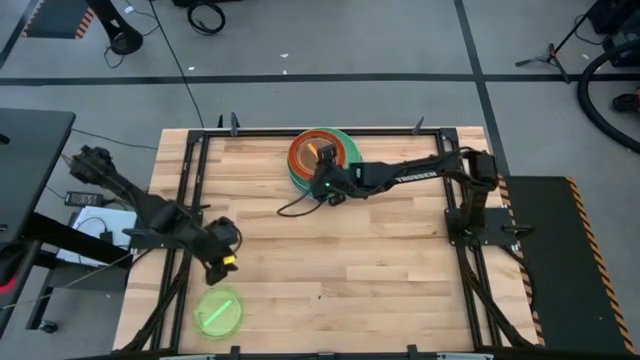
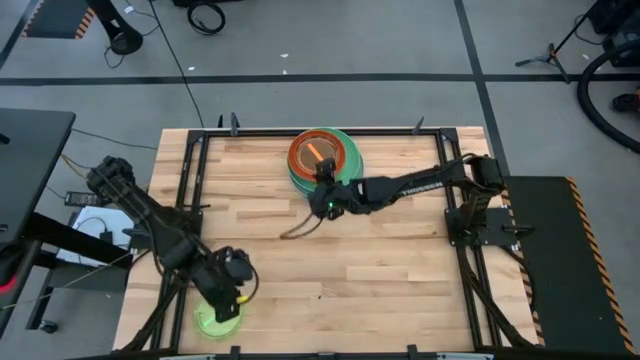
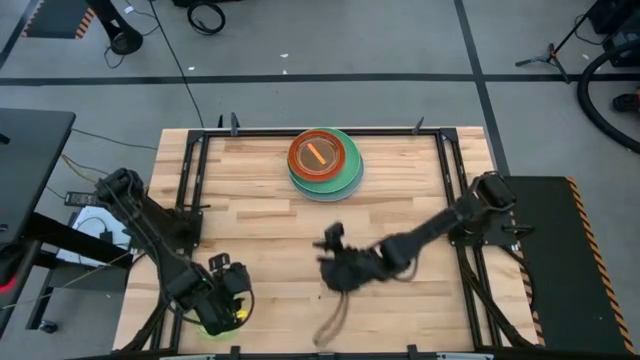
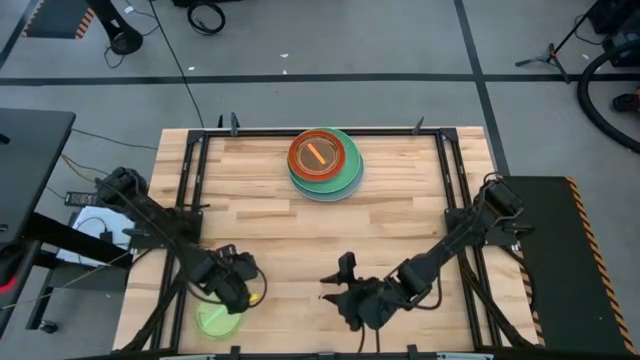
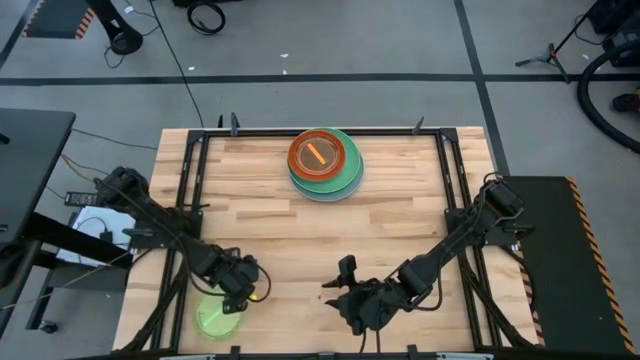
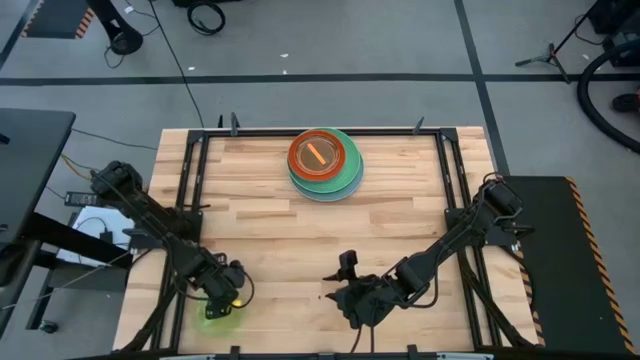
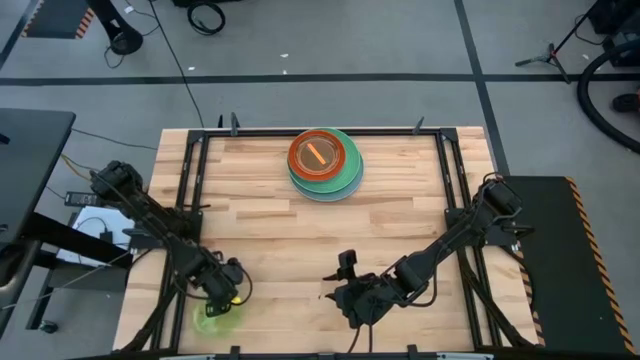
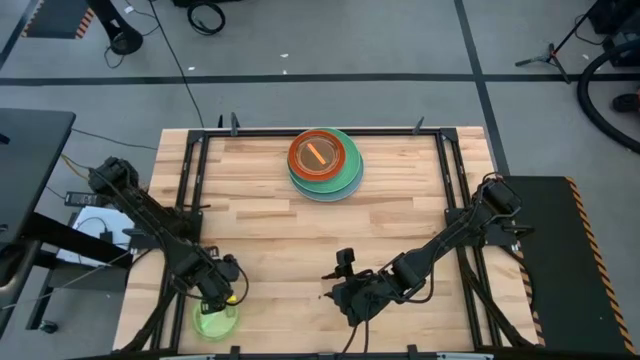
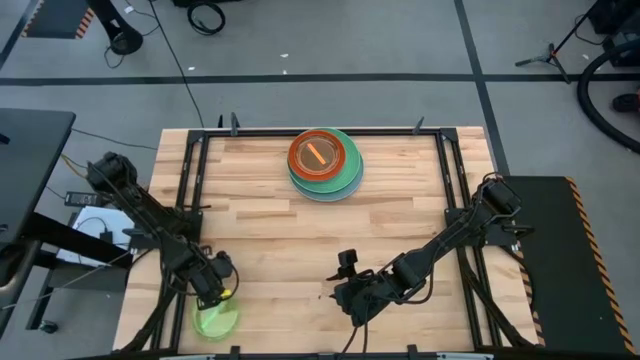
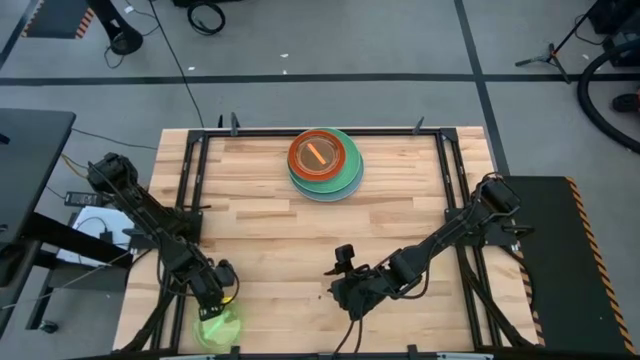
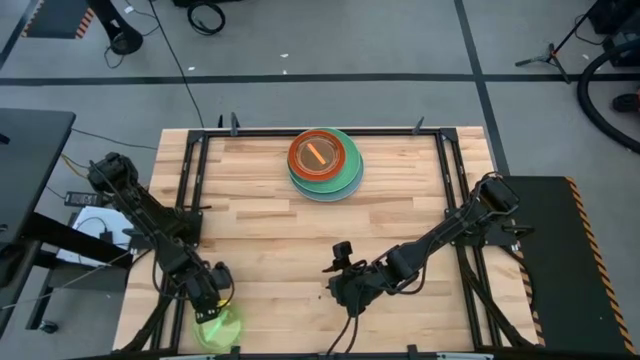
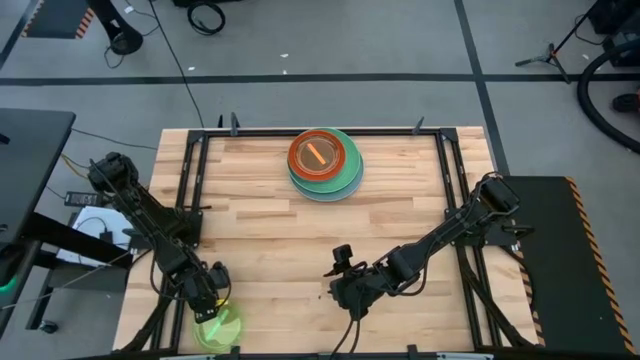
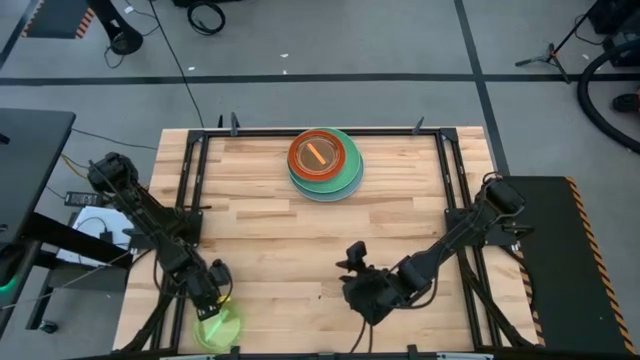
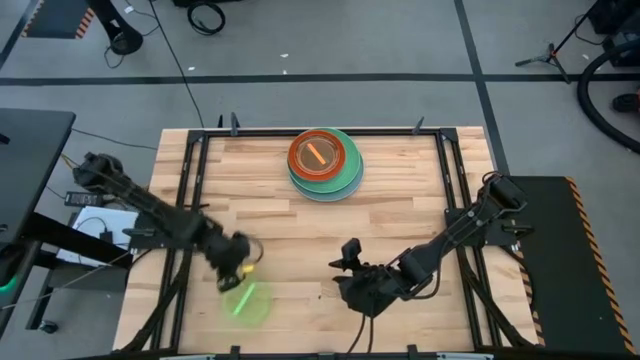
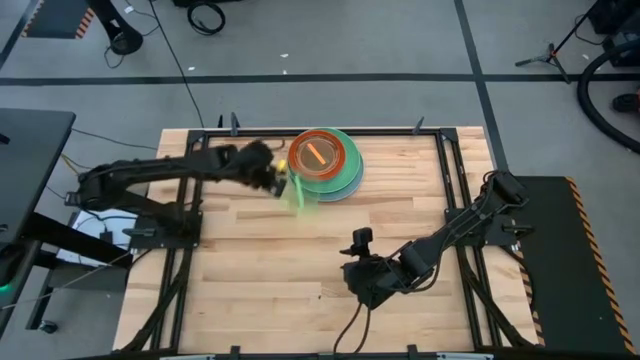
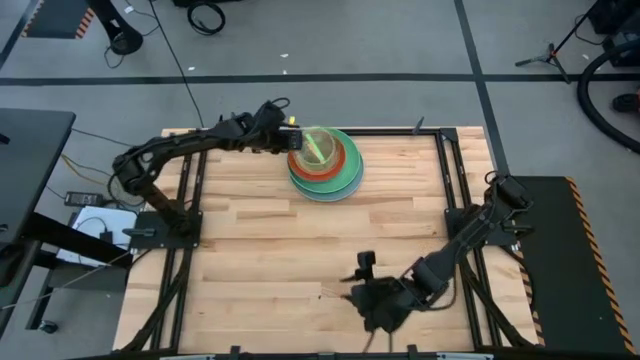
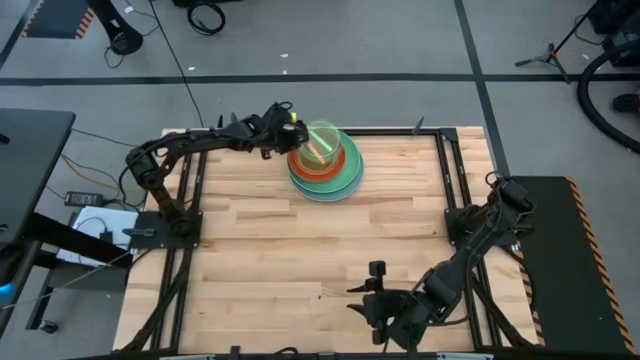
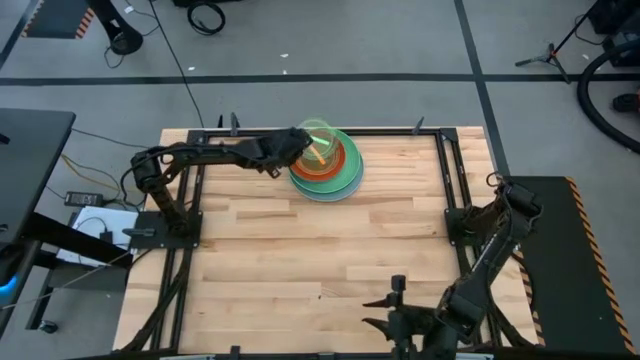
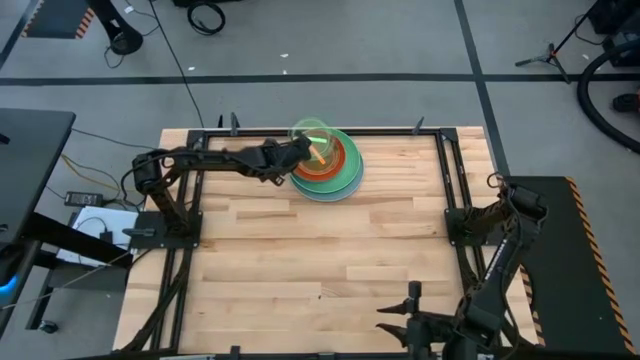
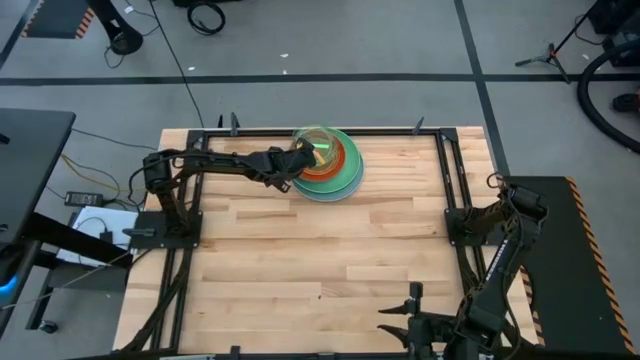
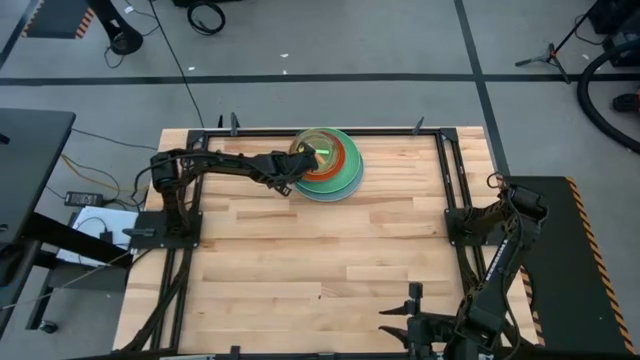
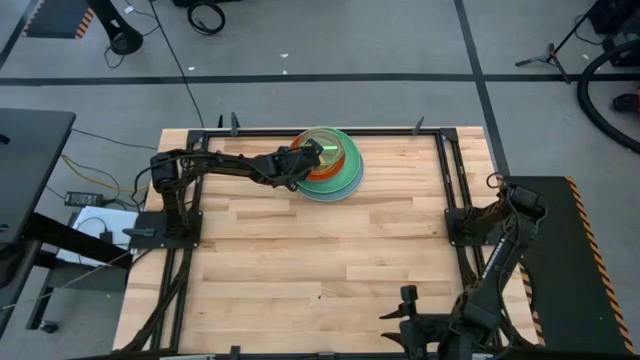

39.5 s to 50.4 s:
Task: Stack plastic plates
Stack the light green transparent plate on top of the orange transparent plate

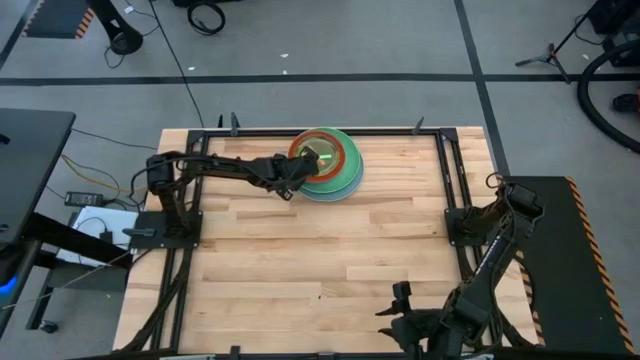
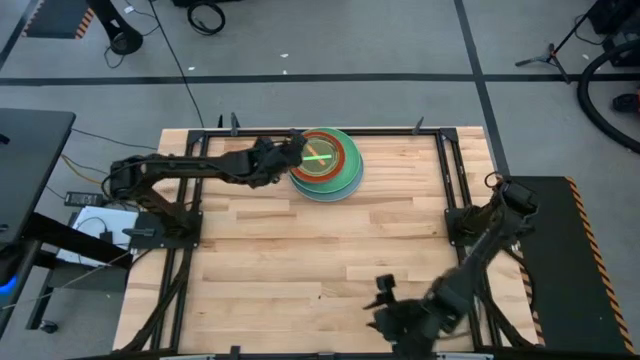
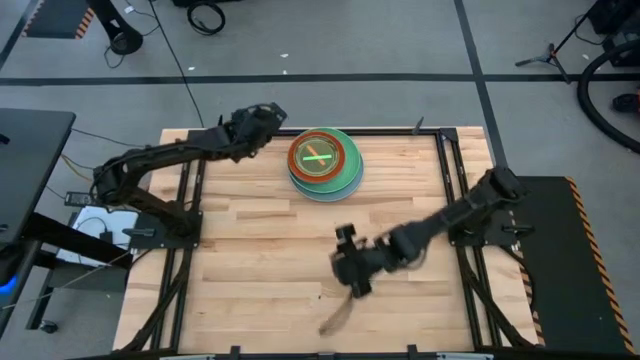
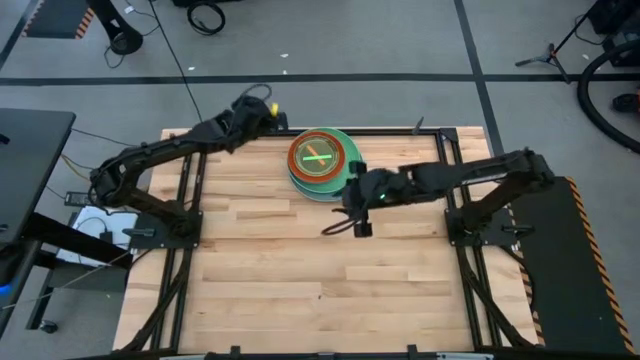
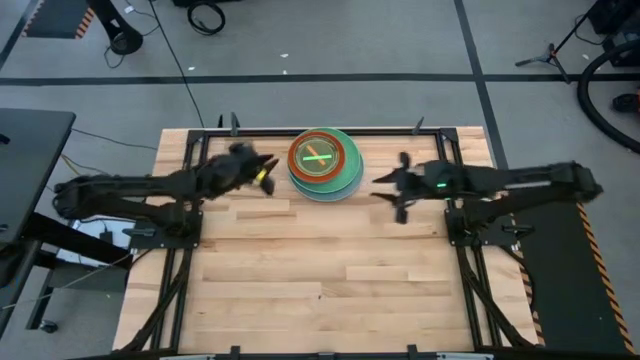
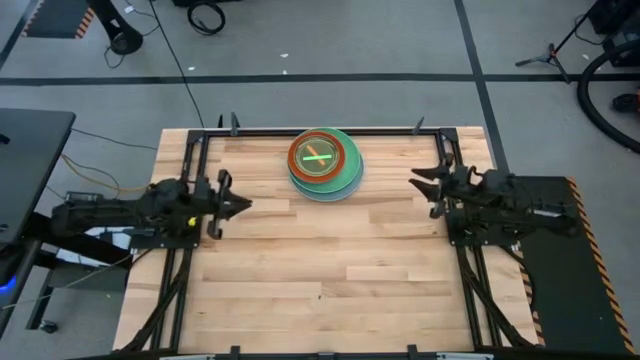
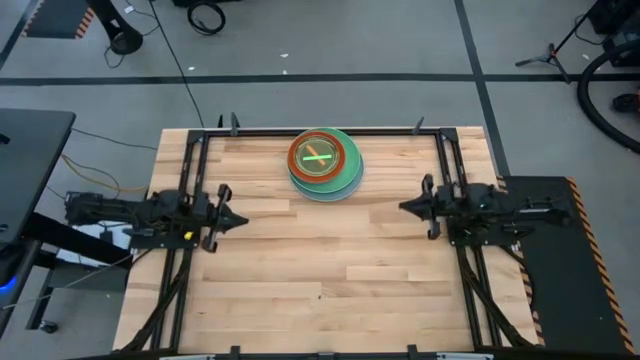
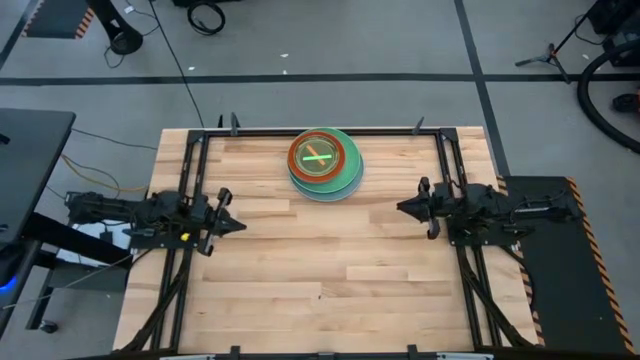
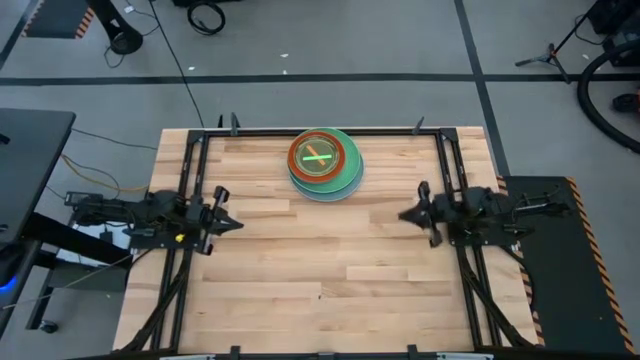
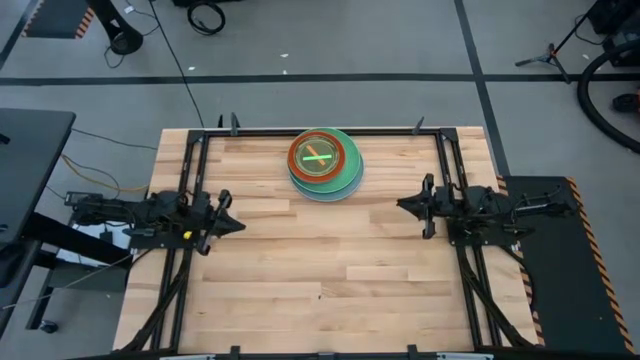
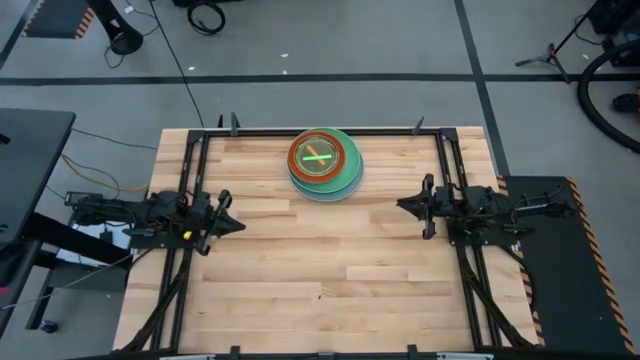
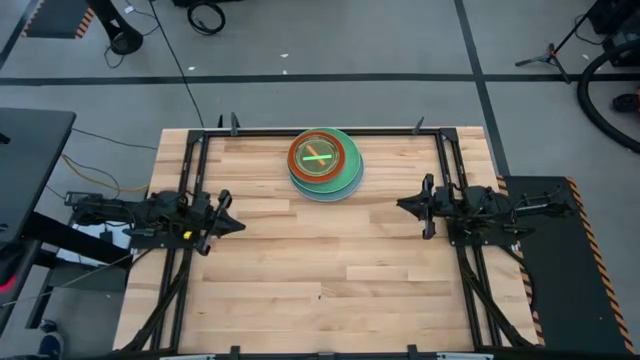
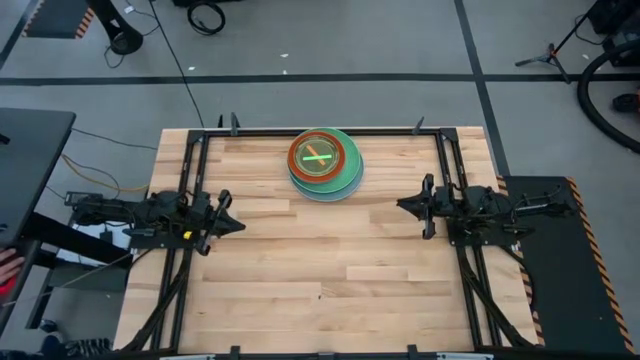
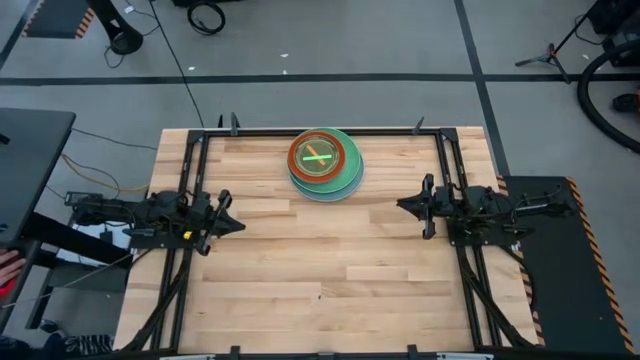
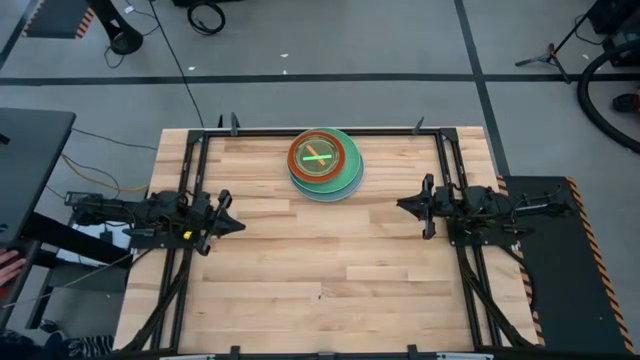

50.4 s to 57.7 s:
Return to Home Position

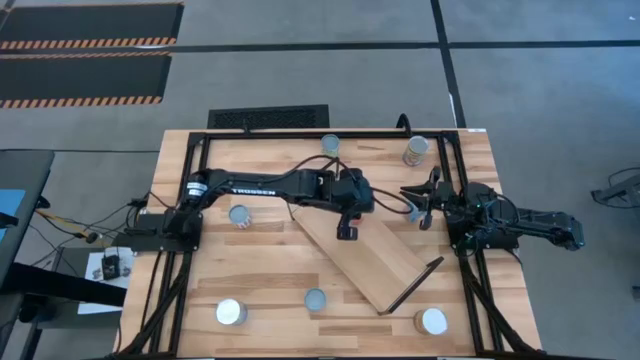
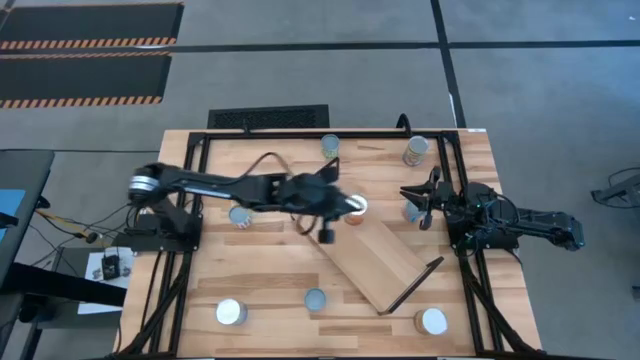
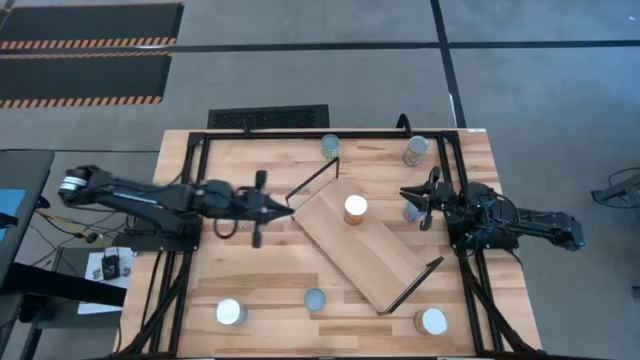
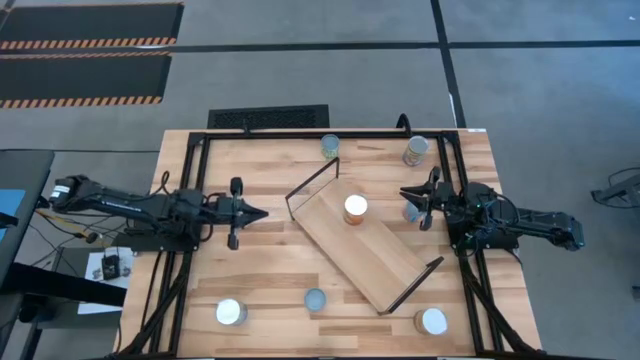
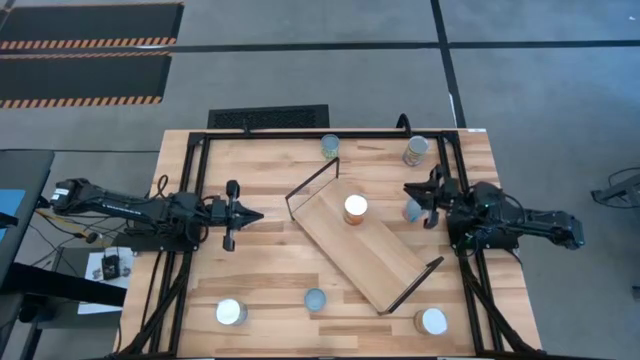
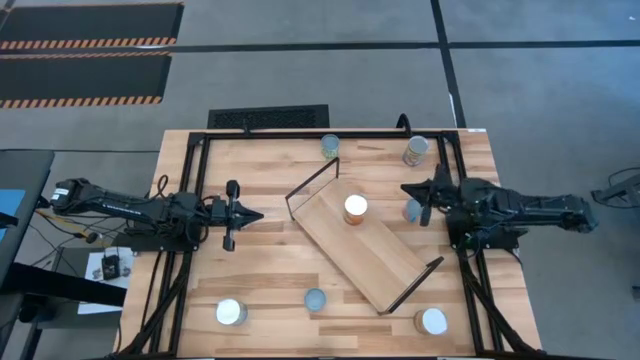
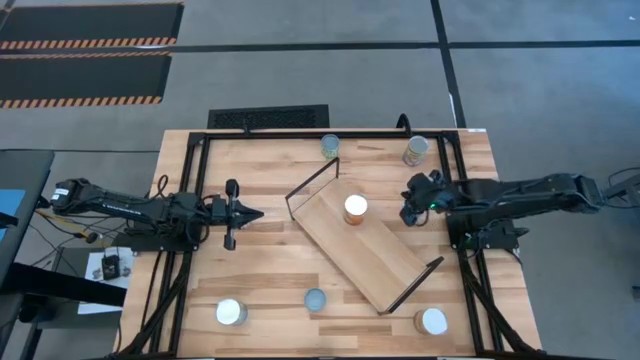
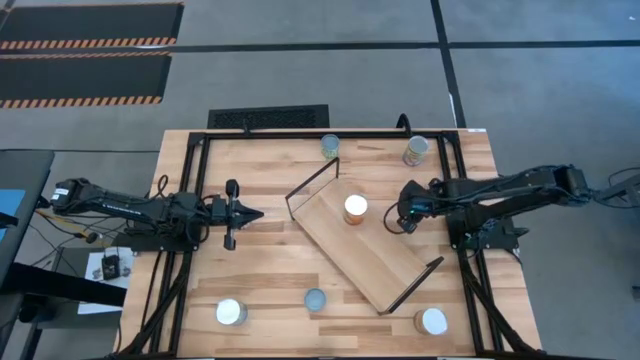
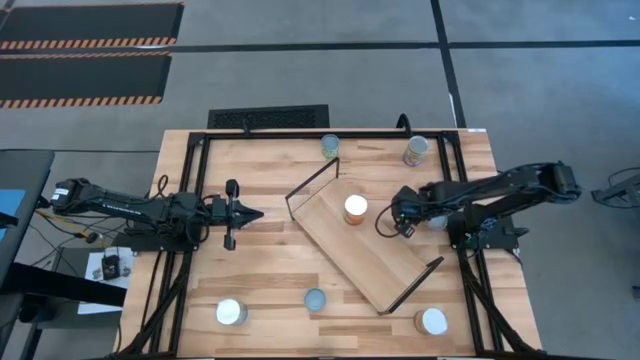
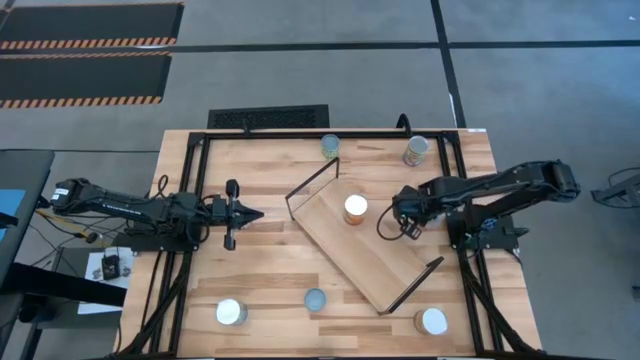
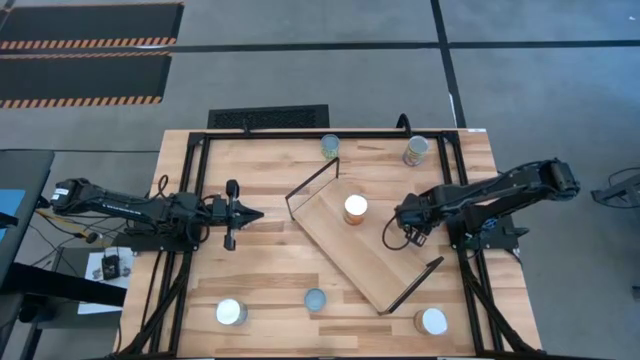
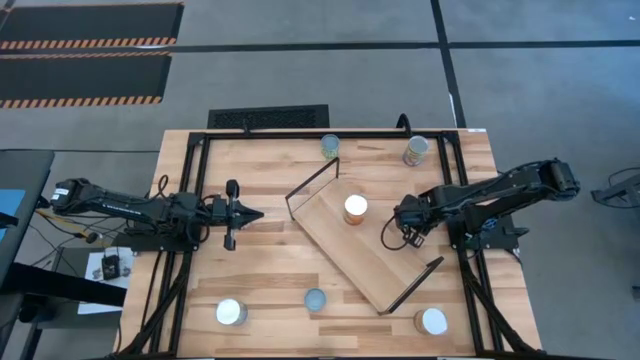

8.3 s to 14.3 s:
Task: Pick and place cans onto a shelf
Put the small canned corn on the shelf
